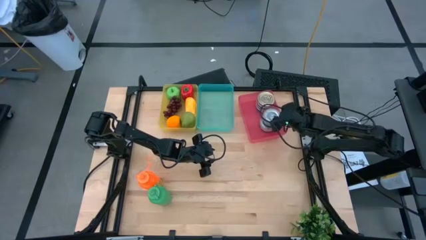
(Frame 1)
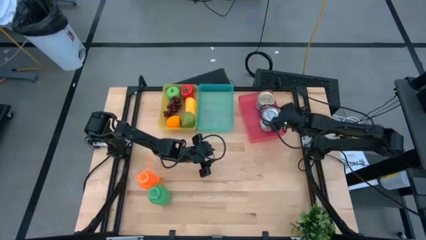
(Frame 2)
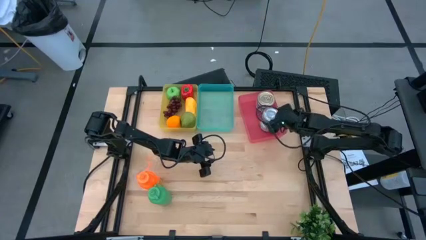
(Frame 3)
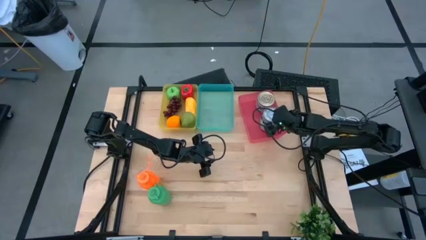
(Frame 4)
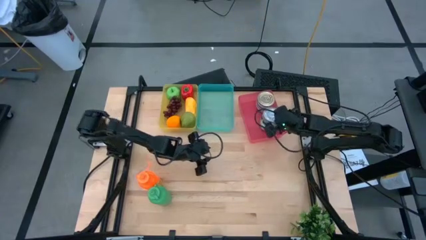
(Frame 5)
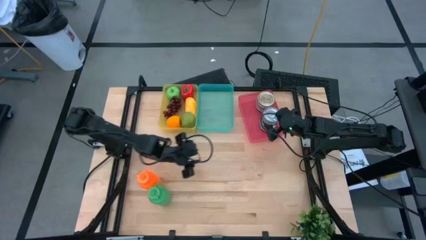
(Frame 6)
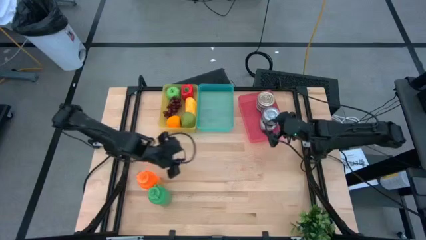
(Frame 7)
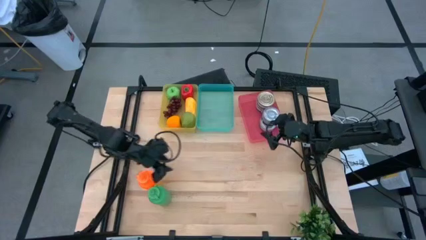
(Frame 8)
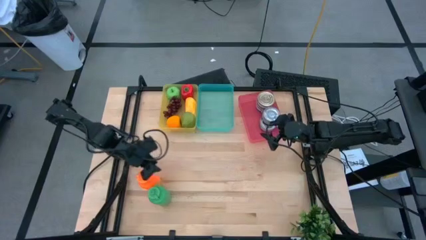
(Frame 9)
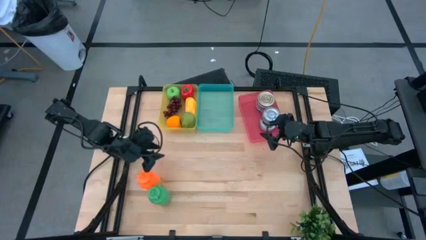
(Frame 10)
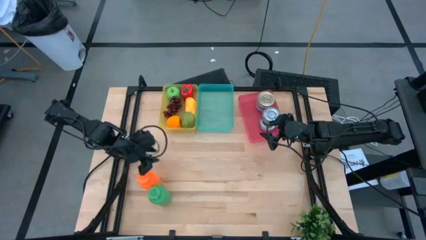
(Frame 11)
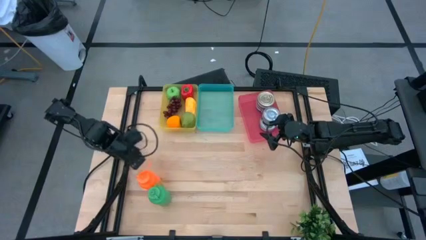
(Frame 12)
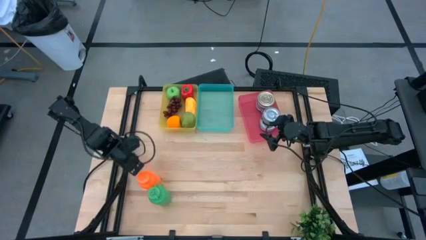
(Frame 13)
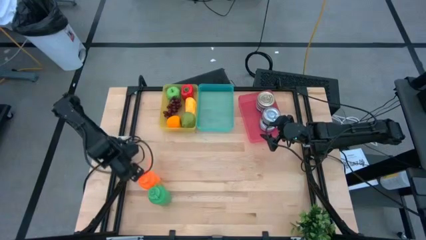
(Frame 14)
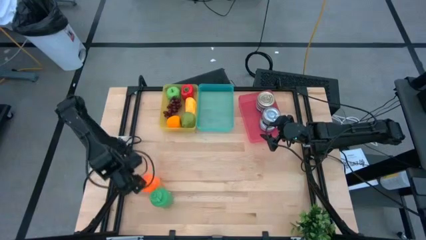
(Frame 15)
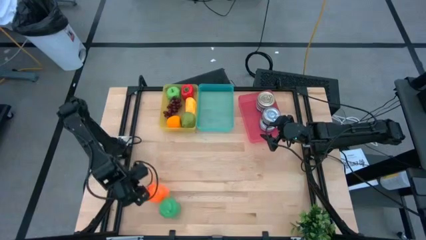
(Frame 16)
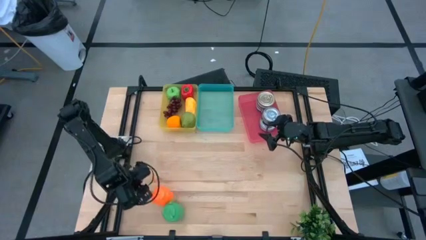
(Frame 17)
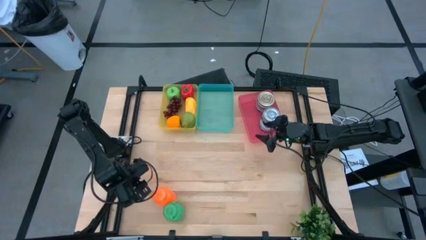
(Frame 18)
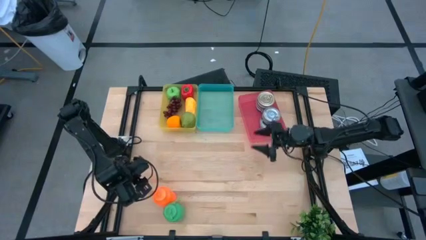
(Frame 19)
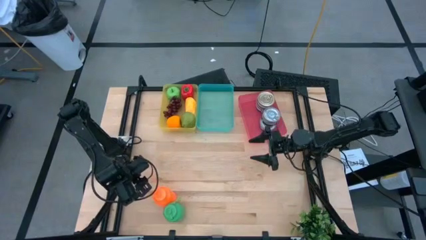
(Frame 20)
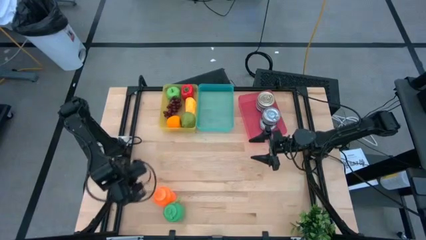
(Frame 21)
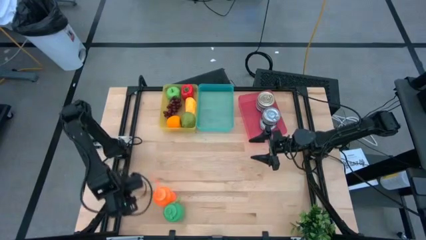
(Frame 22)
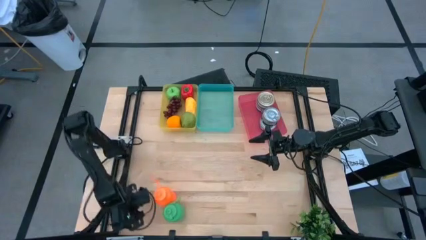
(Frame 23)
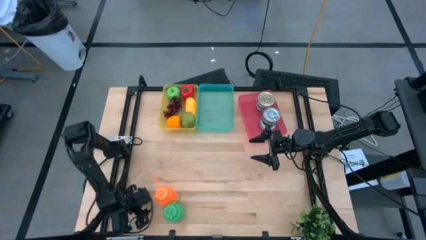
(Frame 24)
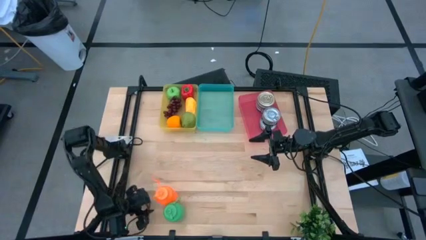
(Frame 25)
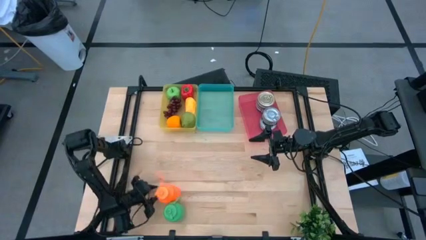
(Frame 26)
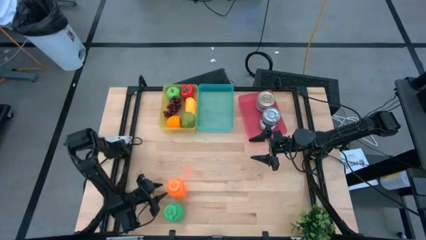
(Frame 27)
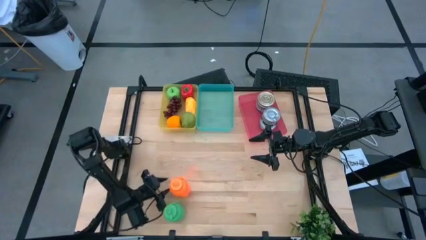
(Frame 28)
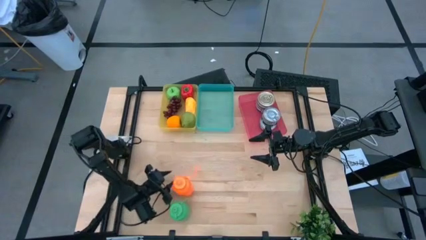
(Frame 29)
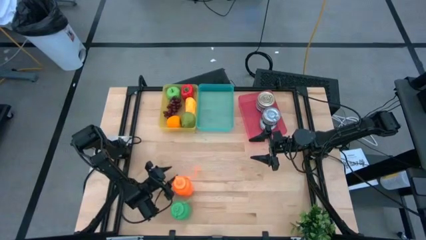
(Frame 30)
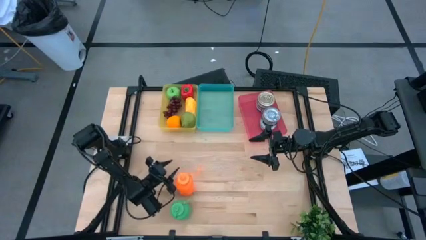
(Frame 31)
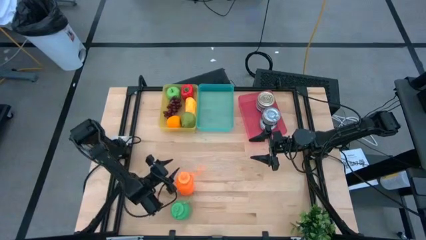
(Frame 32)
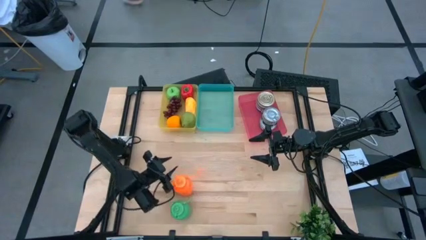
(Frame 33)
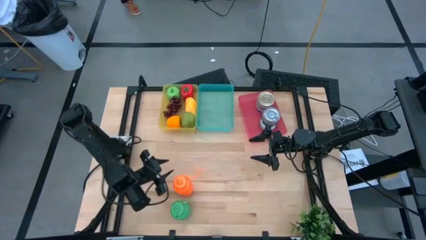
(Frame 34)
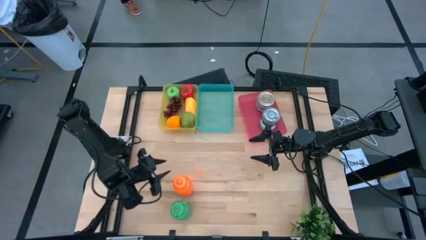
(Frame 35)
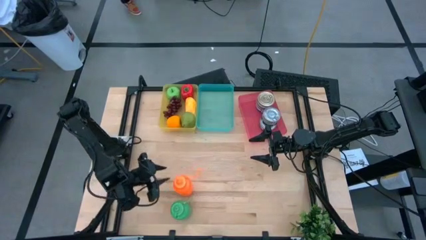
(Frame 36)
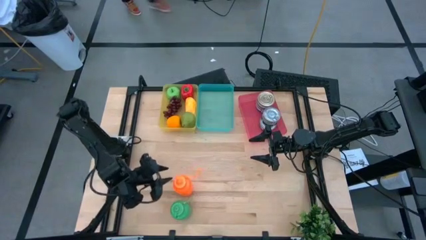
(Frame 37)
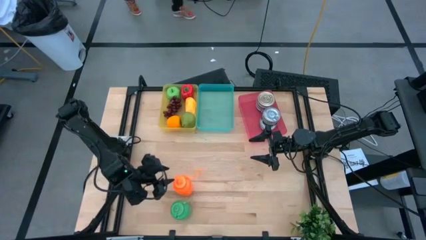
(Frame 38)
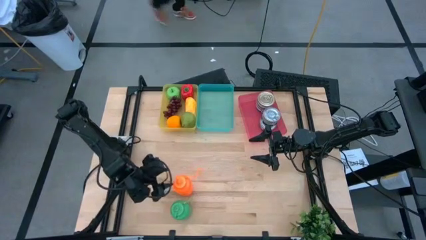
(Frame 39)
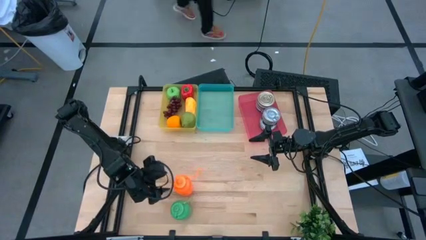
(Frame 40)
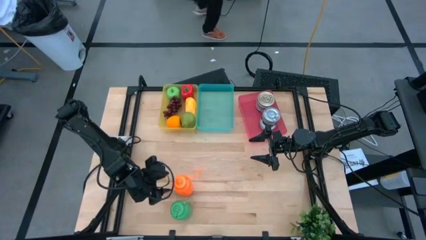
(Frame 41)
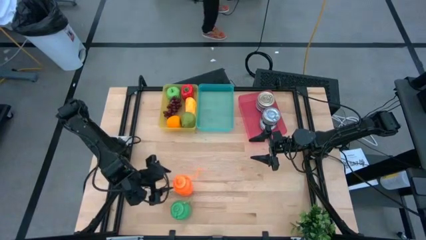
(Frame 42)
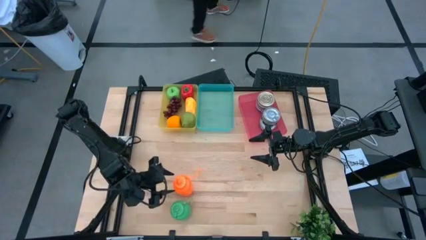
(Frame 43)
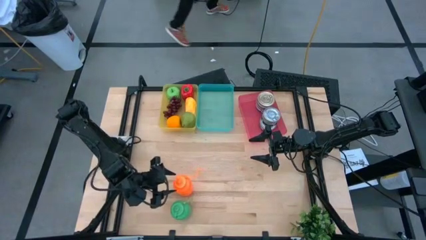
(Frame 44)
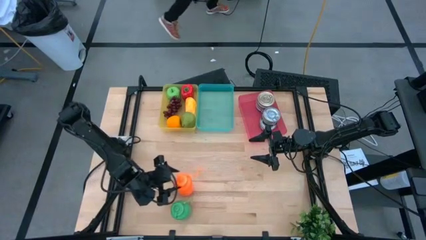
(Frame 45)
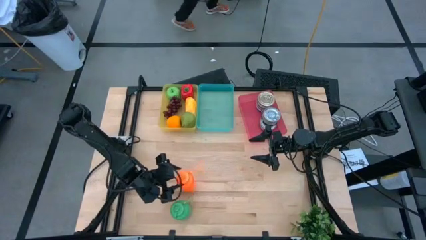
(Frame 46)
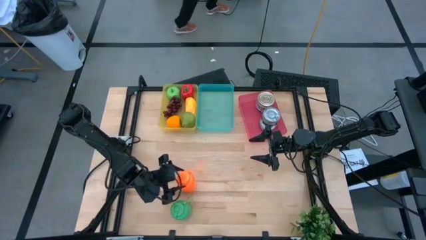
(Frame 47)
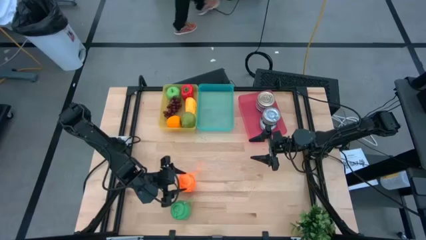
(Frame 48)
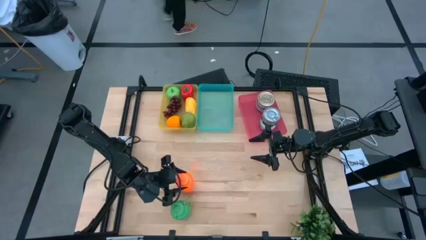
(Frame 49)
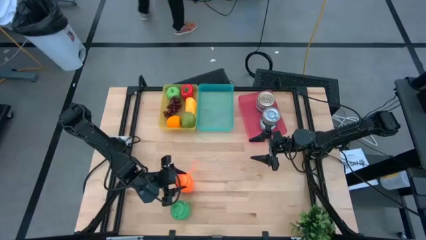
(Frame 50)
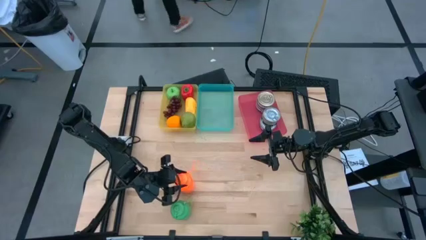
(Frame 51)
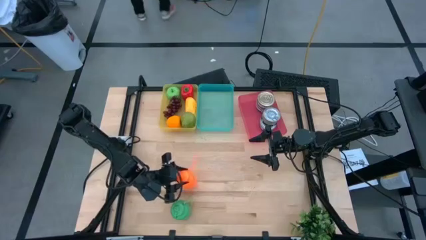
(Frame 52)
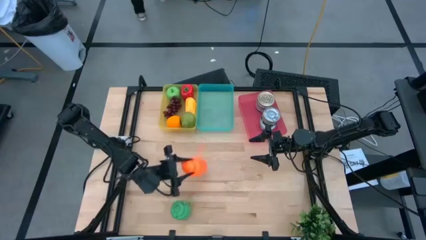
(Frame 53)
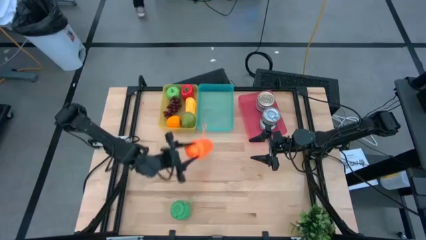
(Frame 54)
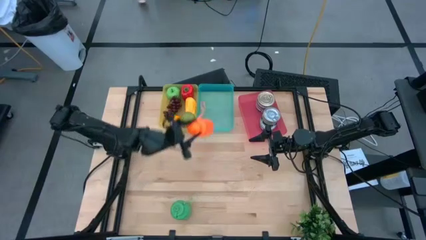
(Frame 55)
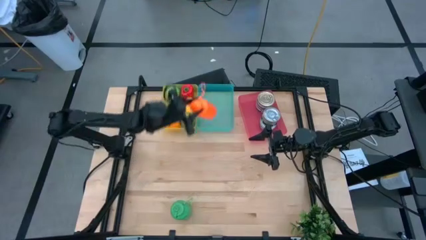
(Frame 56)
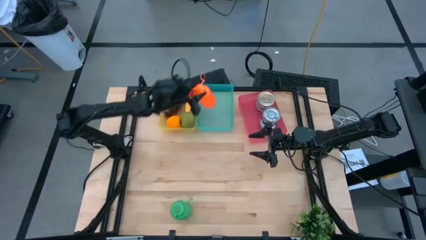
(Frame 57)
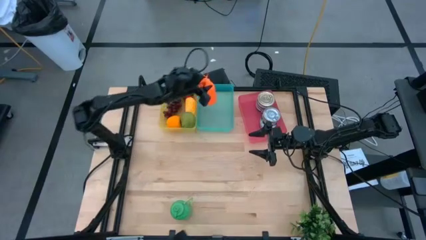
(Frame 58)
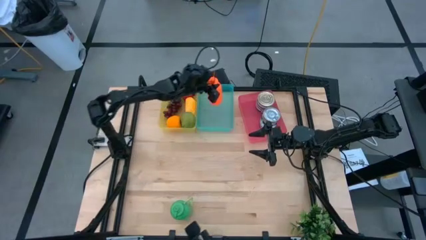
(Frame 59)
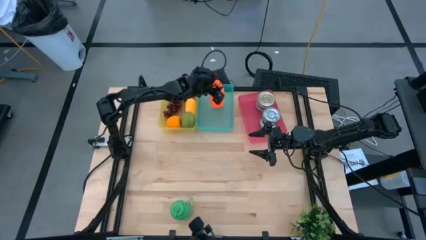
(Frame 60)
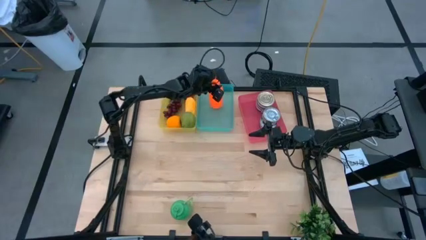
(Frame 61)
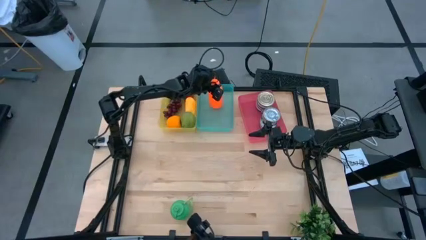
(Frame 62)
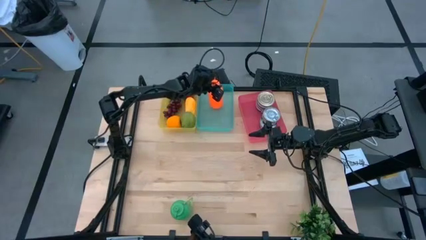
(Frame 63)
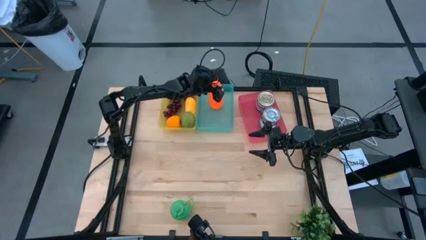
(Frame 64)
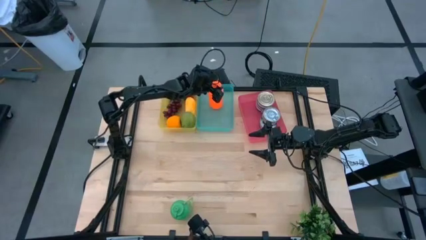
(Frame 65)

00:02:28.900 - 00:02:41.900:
Task: Pick & Place Food Item
Put the orange tumbler into the green bin
